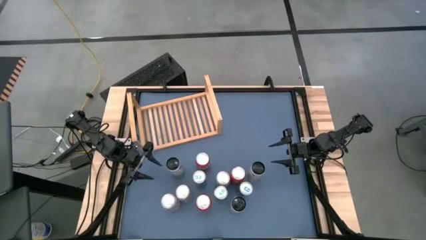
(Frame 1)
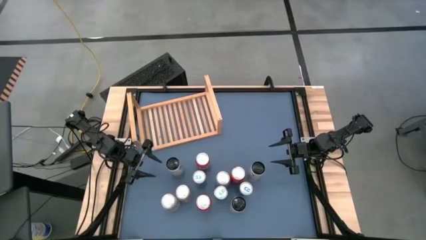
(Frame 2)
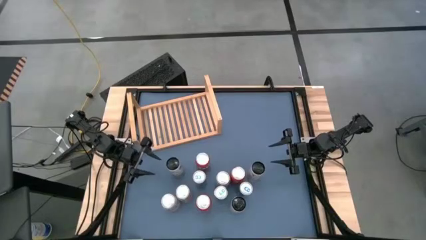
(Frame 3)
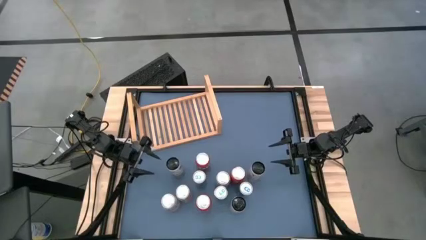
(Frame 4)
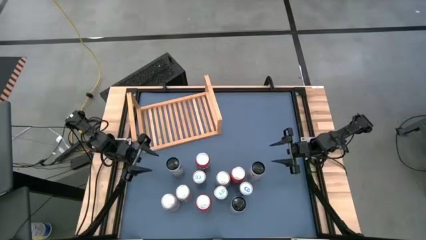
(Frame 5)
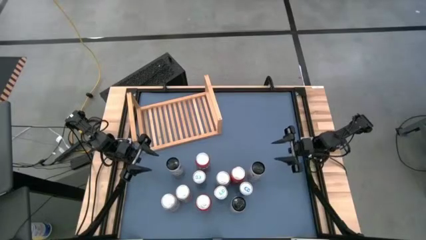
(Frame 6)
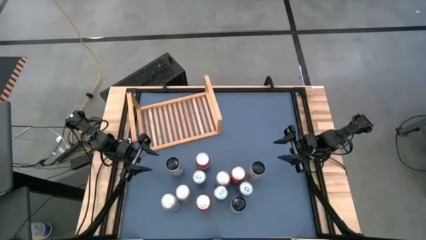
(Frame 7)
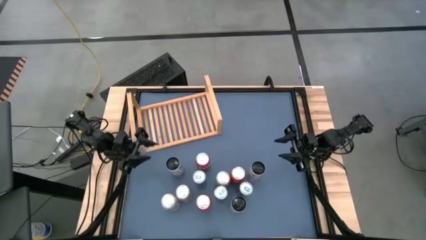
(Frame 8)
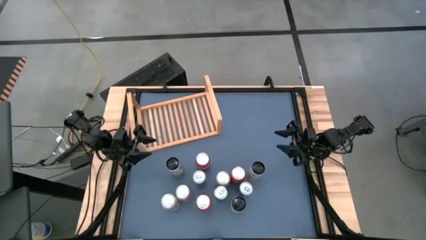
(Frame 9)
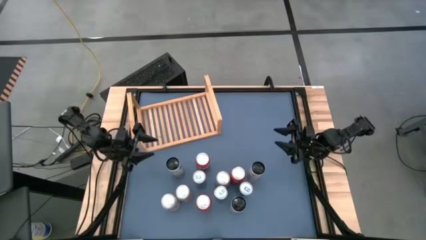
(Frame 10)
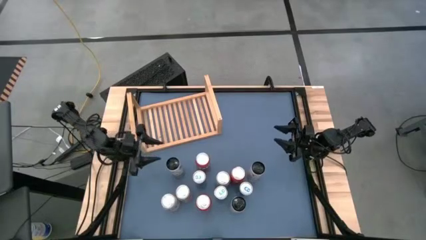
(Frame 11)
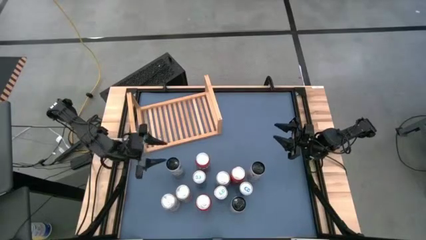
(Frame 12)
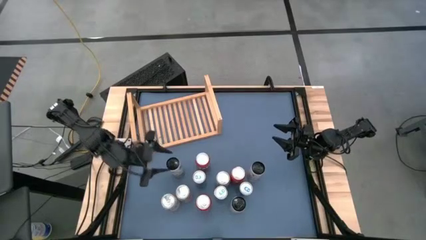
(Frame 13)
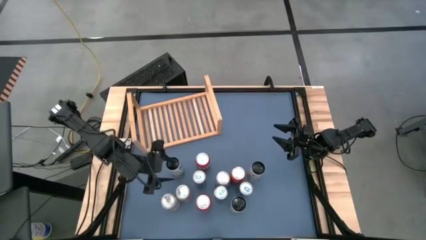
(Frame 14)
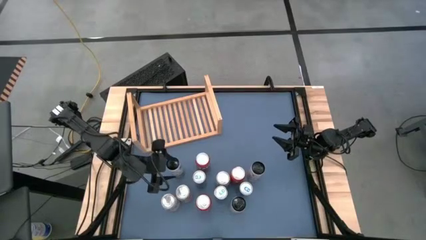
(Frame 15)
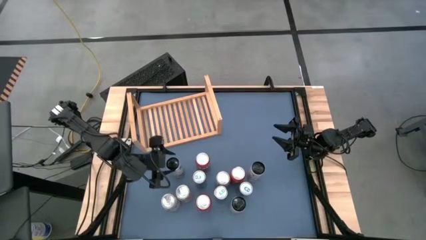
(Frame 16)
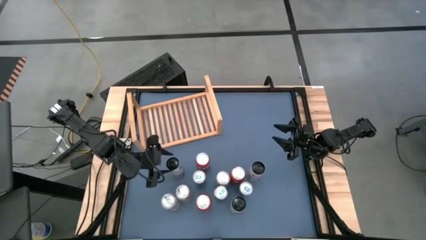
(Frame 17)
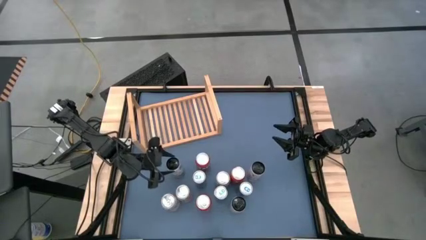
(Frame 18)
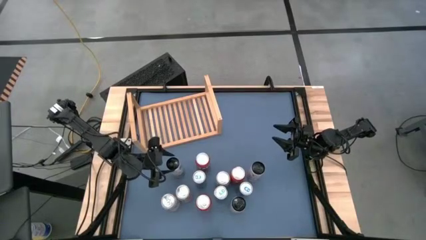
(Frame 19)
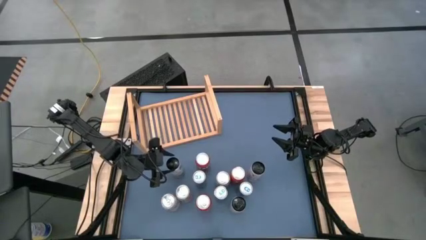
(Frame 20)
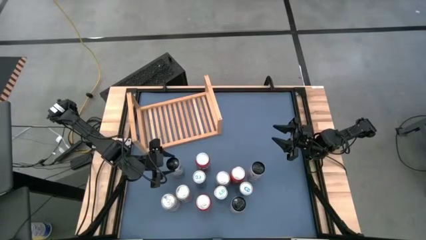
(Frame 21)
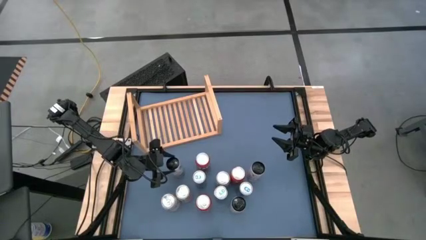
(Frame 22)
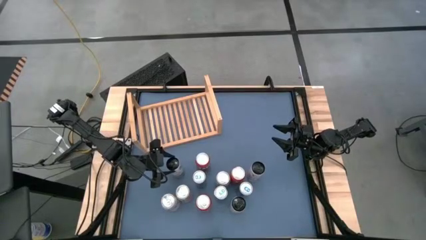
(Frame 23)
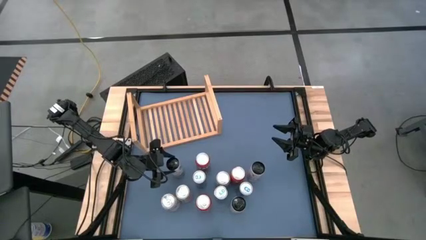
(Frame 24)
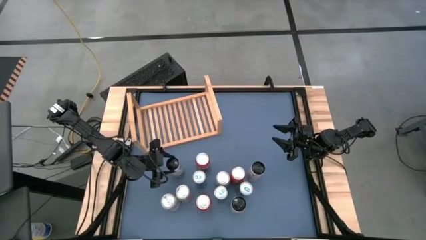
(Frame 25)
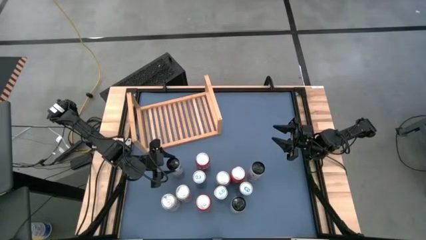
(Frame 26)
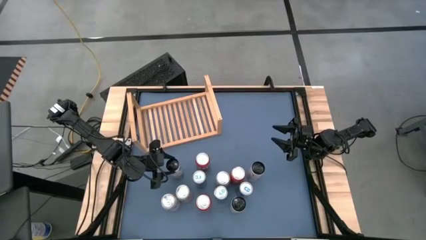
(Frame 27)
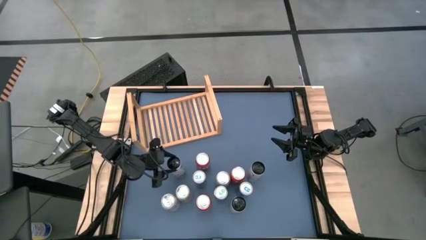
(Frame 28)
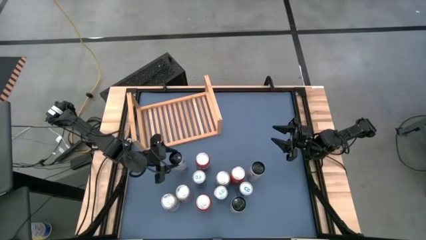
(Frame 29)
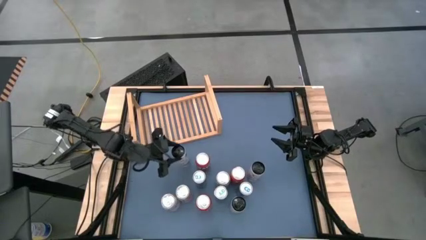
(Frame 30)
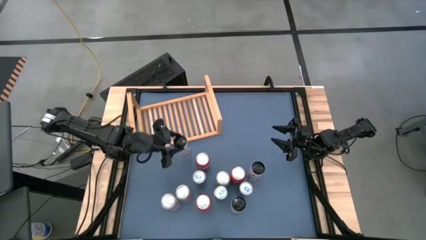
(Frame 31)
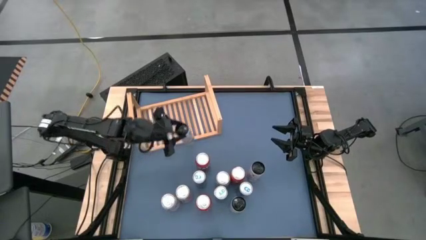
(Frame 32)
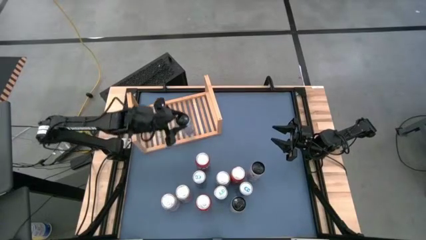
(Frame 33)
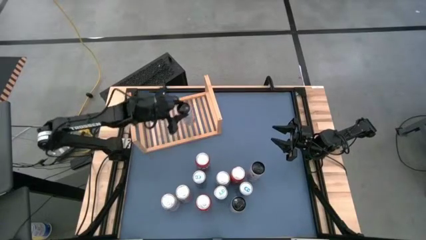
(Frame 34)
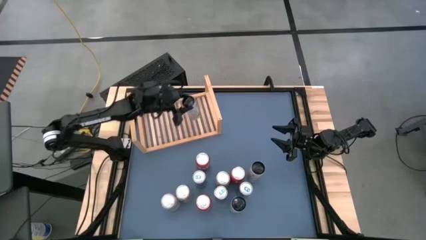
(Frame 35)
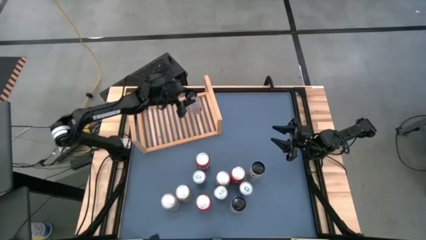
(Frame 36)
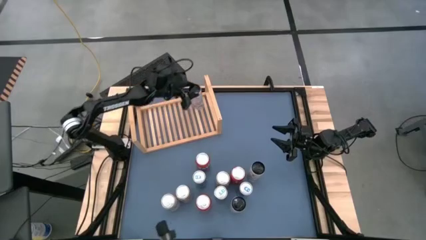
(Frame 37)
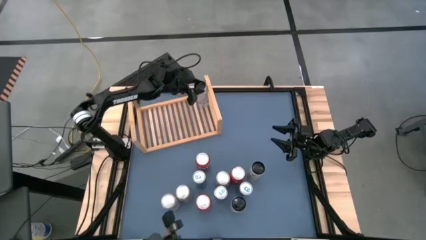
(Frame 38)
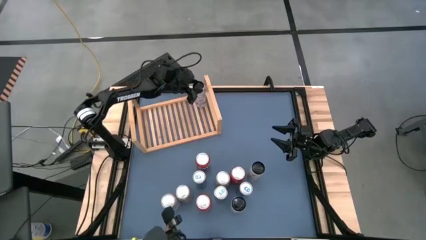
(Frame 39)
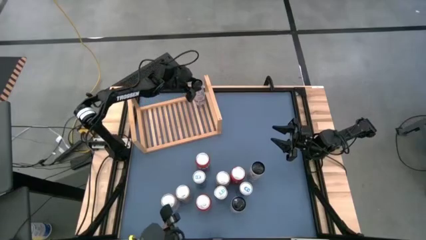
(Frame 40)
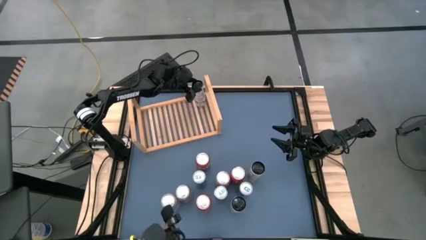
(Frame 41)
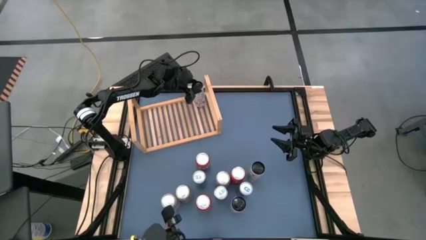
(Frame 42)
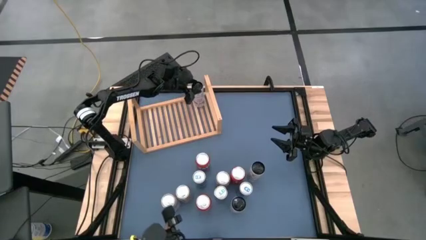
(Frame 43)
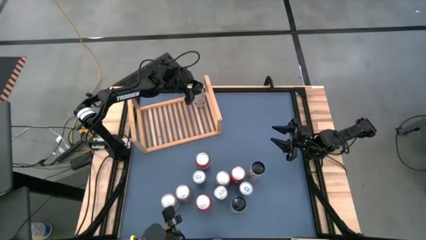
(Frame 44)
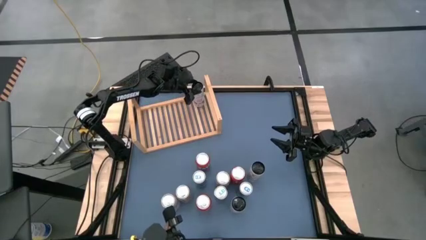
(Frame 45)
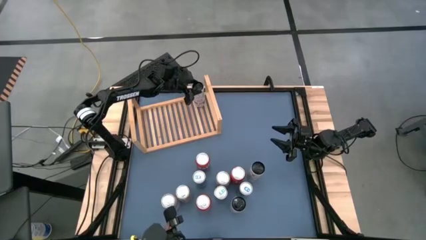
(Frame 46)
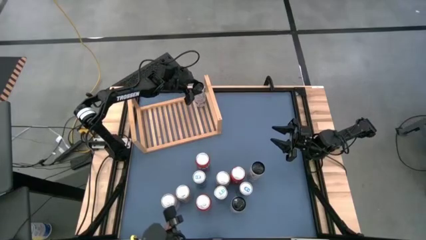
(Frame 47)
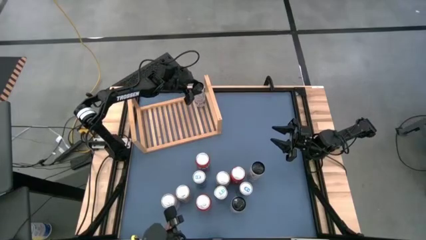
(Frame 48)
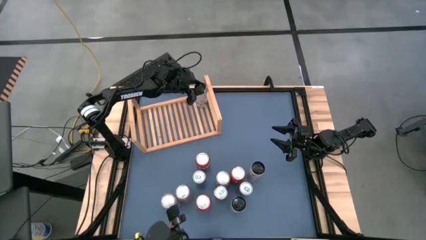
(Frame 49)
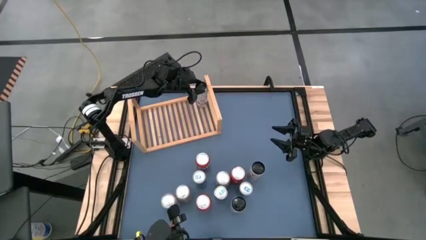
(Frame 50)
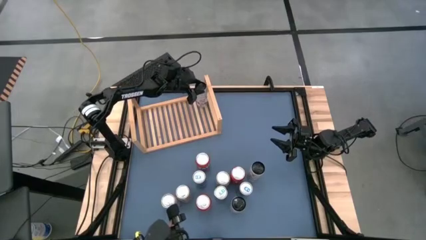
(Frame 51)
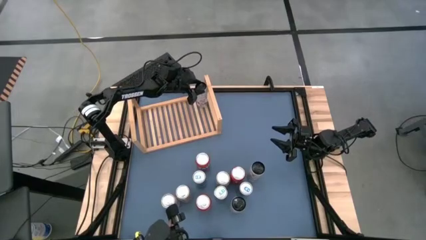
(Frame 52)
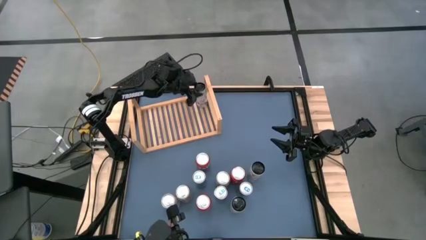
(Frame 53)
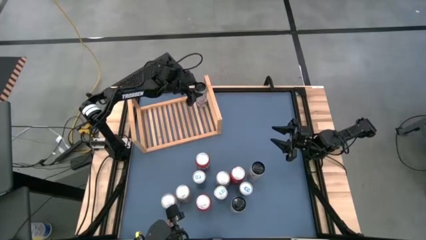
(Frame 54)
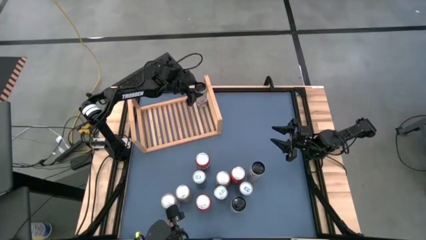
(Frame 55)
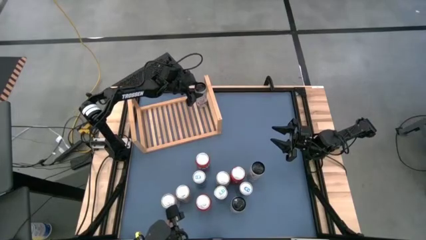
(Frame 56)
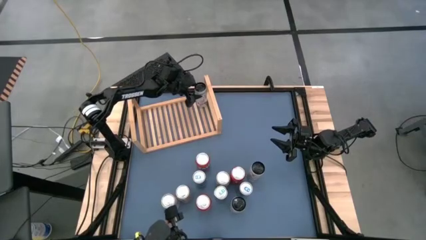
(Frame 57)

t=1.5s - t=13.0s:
Task: Place canned beverage on shelf
Put the left white pink soda can on the shelf
